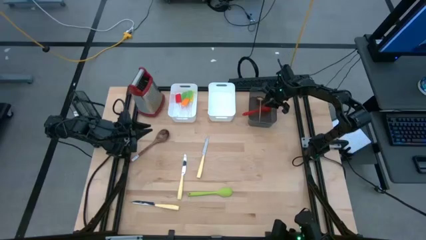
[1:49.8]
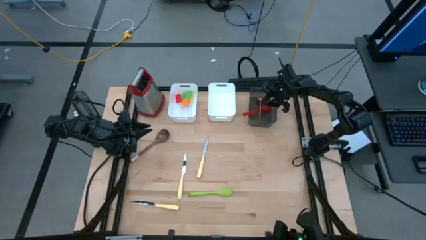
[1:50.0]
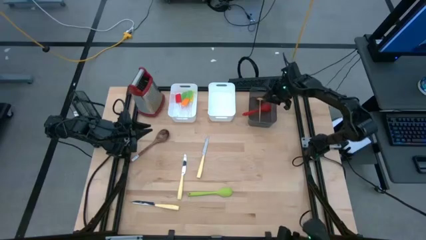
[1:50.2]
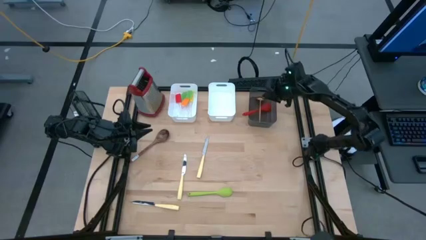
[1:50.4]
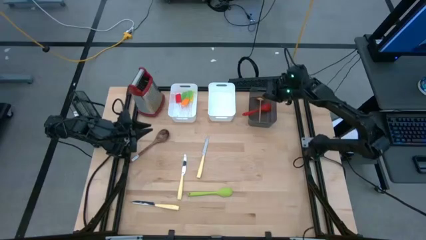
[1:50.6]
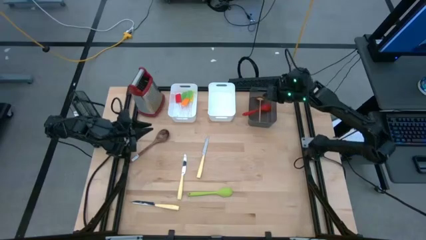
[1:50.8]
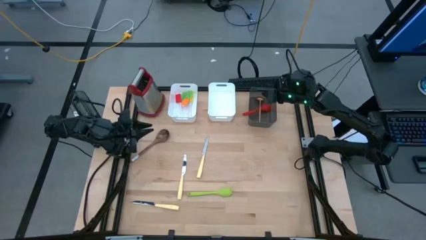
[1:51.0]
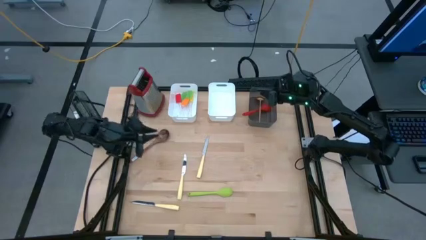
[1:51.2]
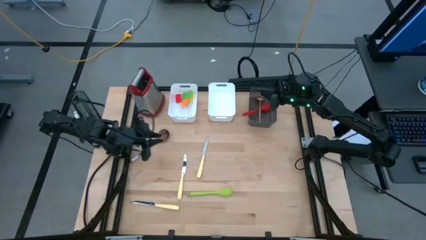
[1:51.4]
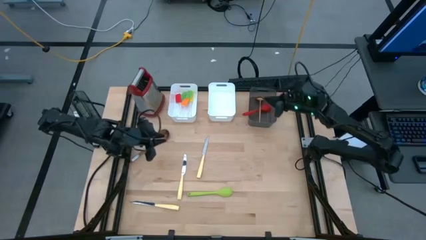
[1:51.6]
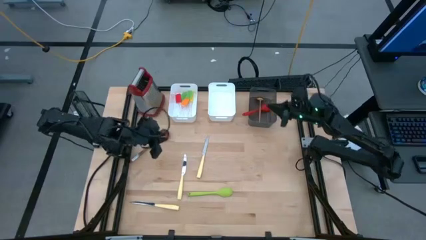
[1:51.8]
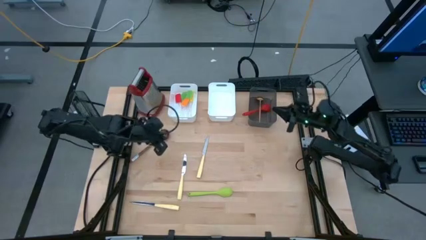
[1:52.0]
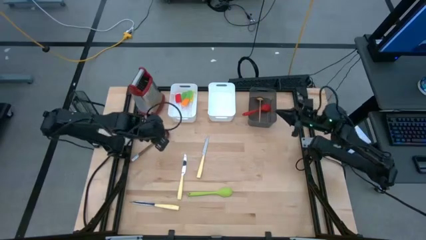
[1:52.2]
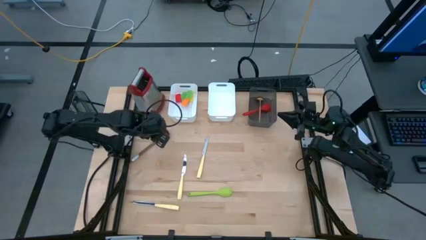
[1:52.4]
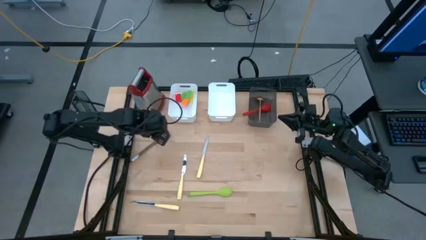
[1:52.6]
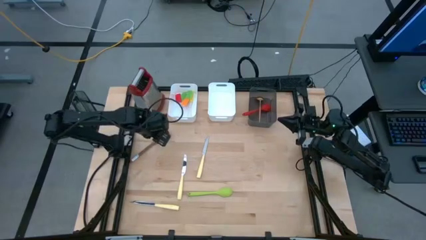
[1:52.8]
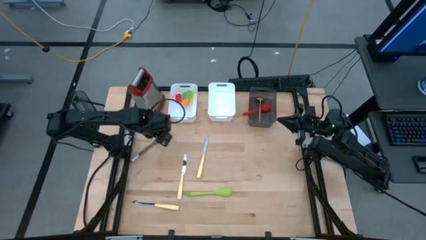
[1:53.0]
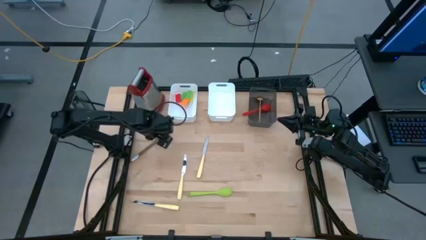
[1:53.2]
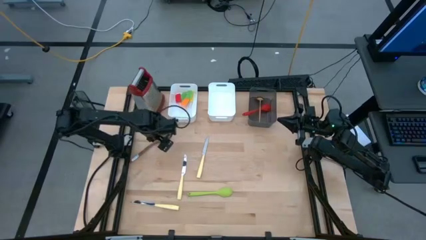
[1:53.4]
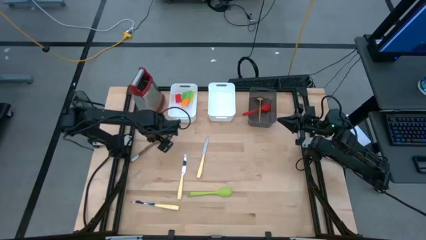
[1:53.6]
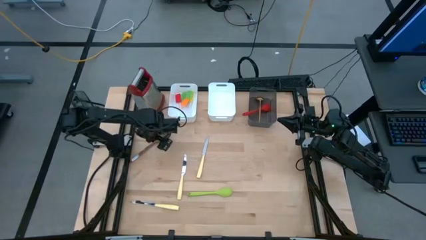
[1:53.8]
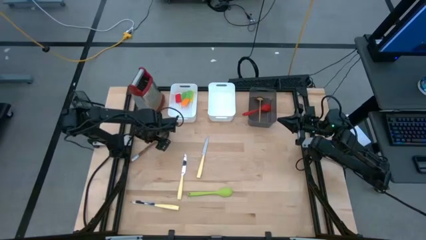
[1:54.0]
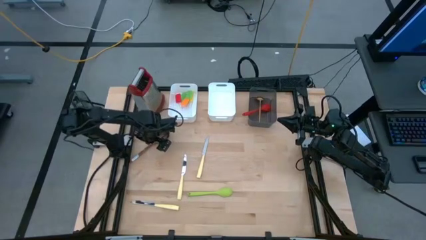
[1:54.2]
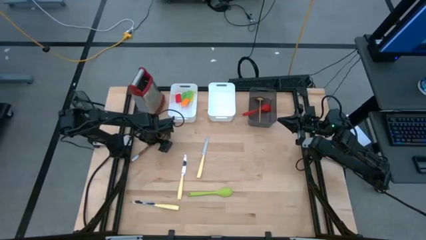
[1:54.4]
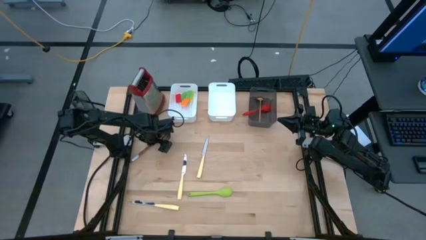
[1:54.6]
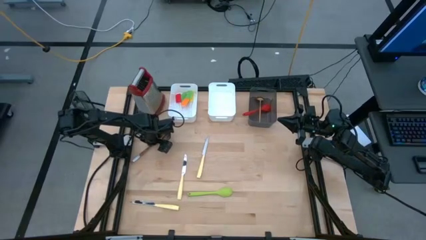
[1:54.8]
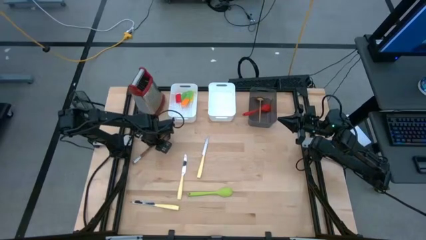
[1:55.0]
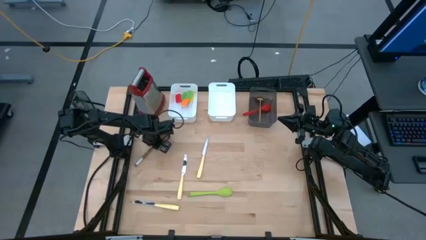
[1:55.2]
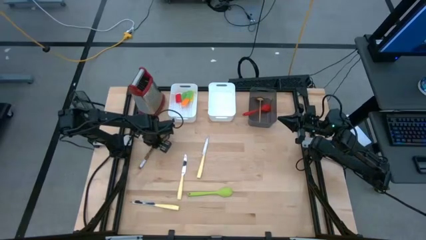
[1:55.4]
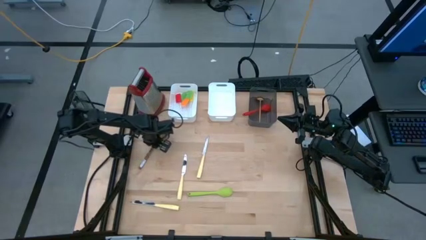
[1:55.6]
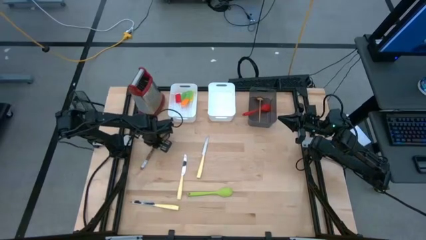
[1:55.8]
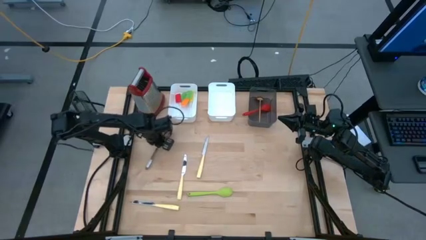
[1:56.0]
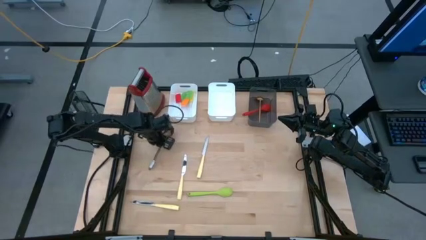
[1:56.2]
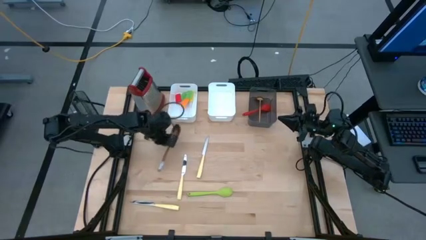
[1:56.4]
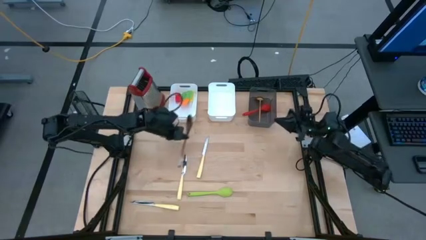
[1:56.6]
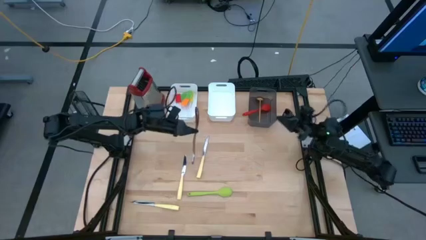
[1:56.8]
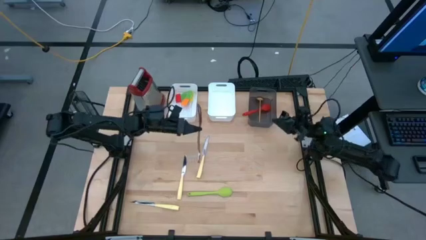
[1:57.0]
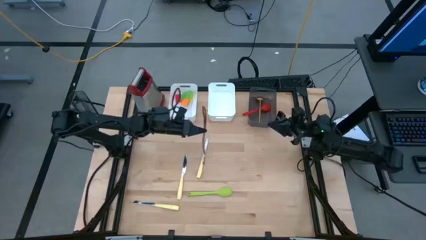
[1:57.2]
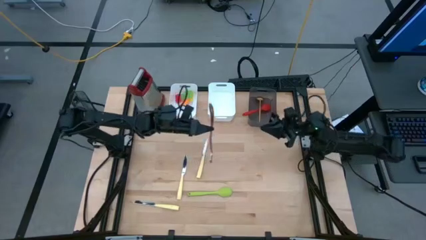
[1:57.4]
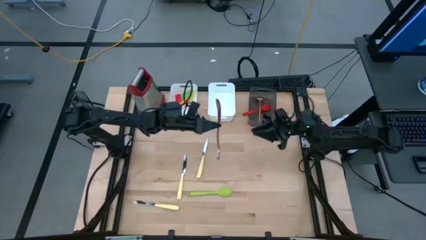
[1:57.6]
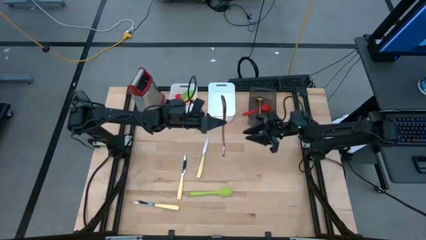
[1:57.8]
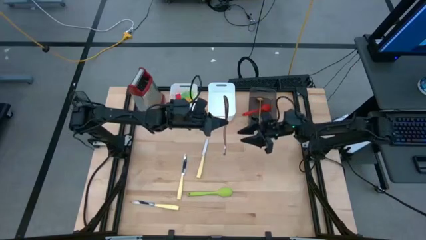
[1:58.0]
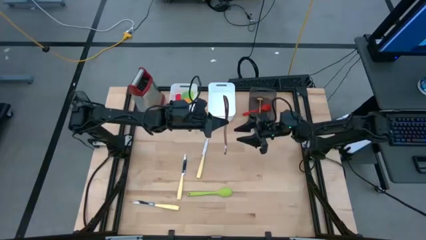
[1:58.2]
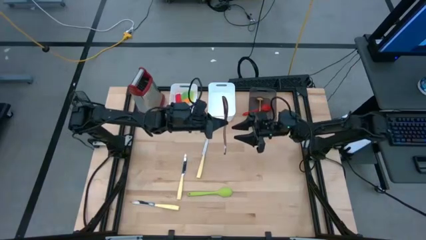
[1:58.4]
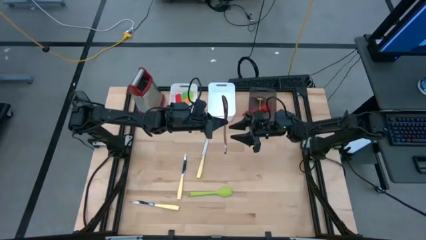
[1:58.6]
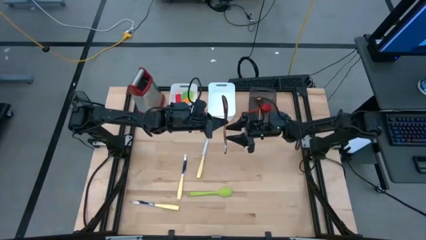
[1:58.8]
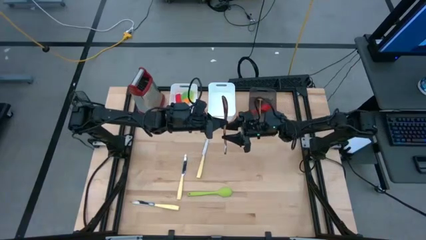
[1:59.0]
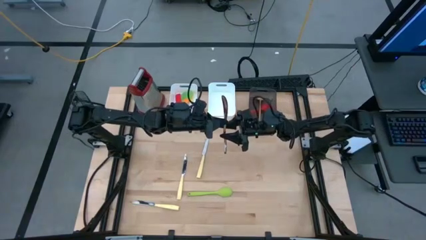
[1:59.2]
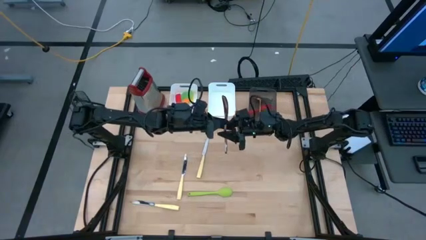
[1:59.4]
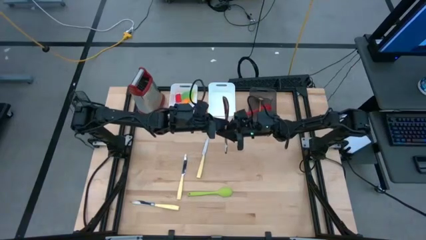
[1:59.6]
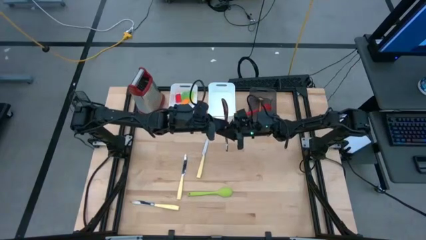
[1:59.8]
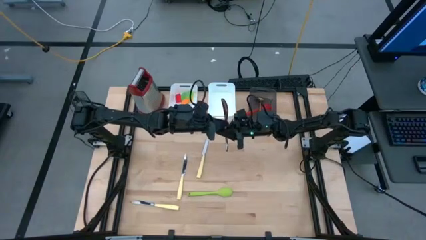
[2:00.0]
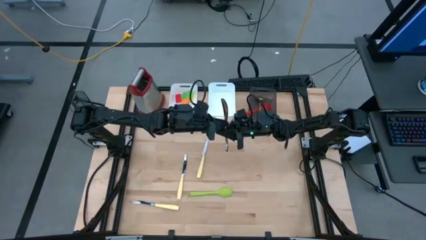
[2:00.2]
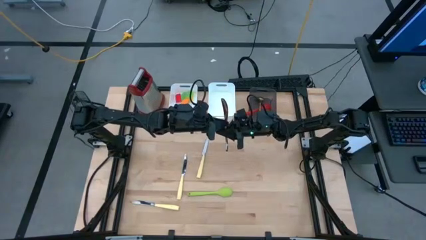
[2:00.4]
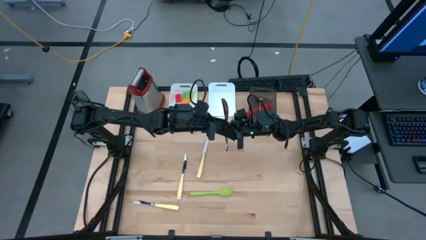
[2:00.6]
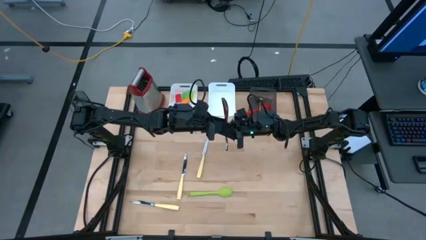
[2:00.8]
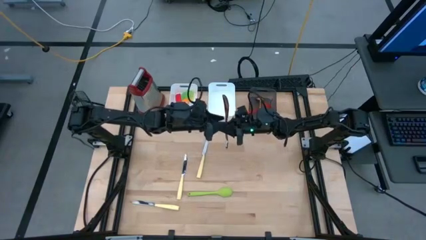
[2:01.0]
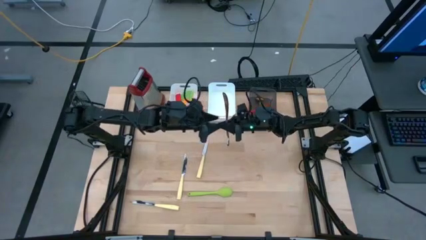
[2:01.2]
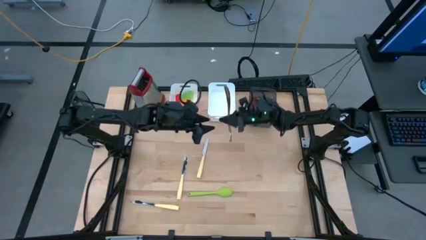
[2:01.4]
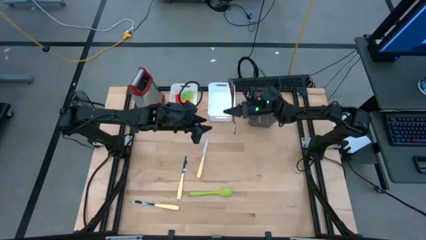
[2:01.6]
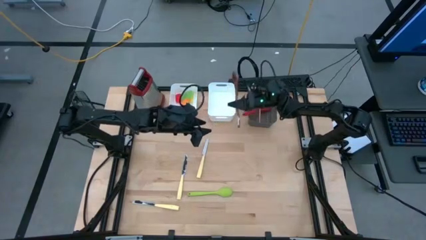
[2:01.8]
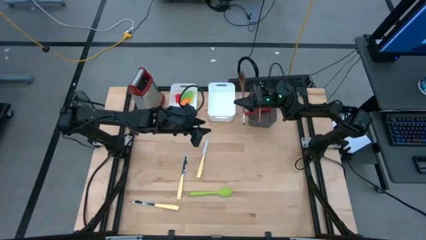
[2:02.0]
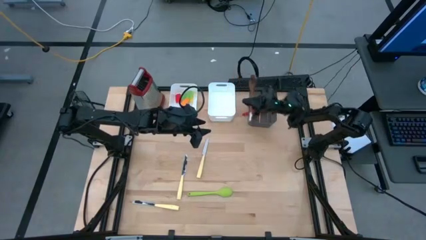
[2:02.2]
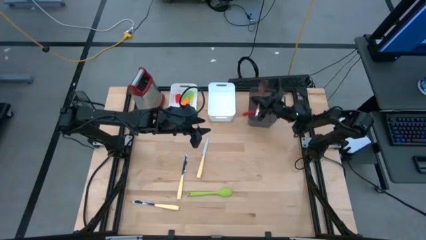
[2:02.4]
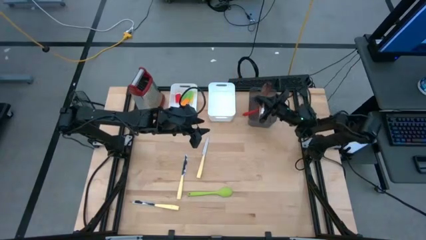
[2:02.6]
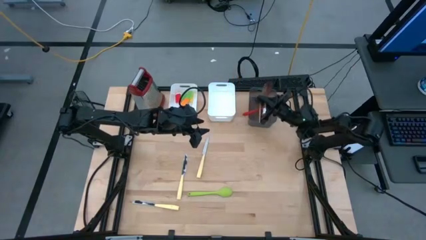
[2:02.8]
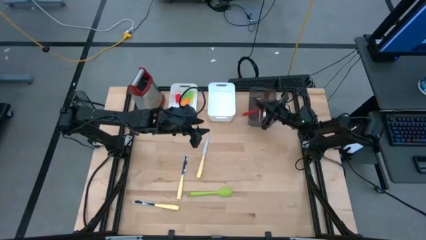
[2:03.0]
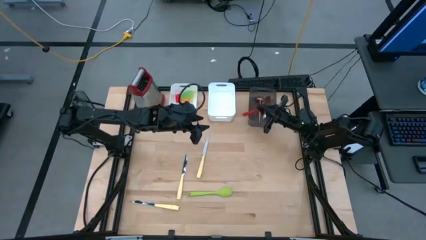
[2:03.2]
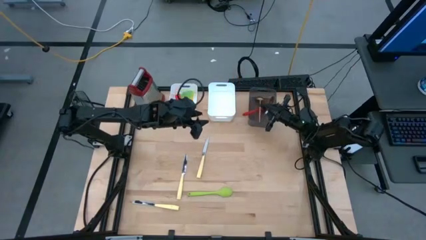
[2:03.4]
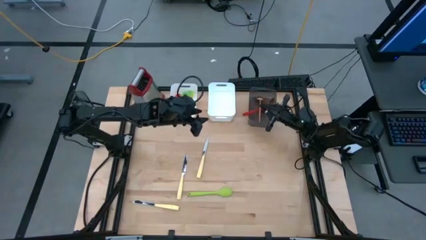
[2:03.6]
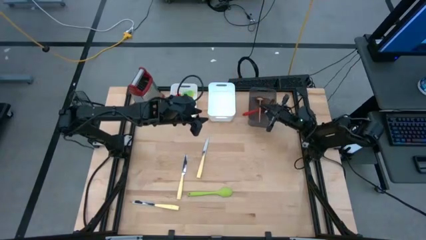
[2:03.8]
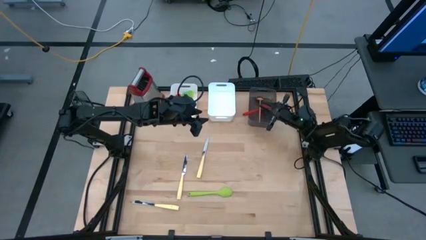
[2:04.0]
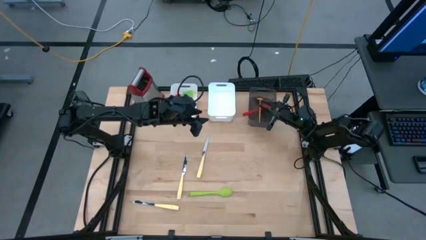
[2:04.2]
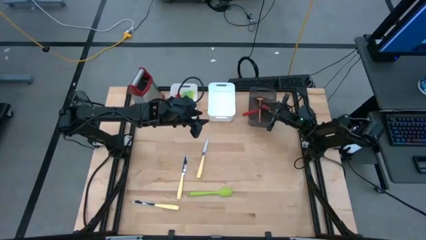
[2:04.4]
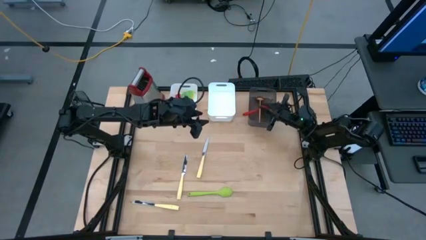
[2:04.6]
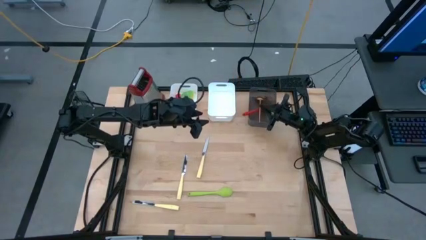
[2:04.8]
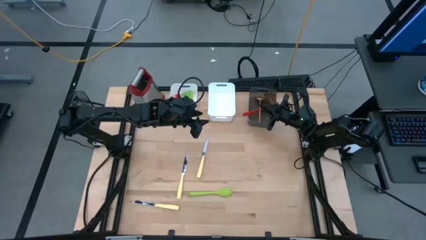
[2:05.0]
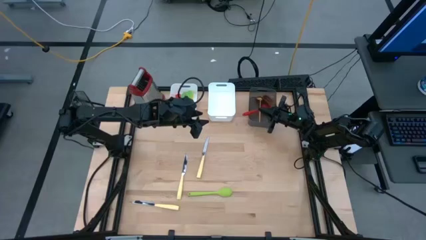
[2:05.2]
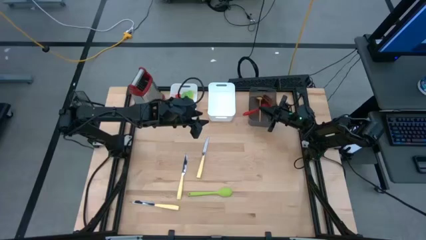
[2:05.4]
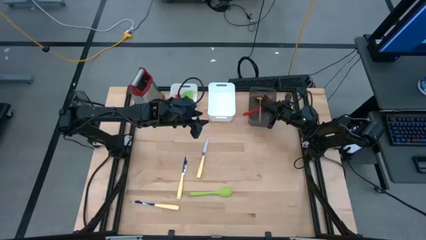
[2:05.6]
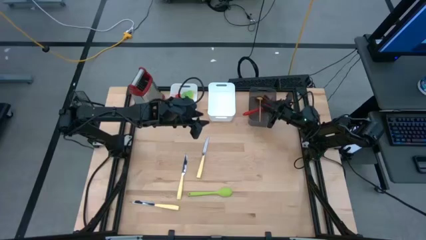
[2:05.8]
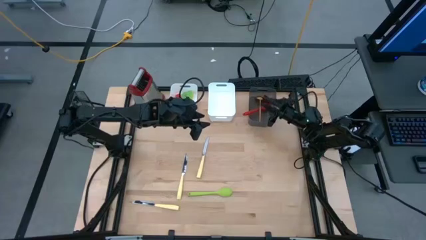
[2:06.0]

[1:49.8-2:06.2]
Task: Pick & Place Kitchen Items
Put the brown serving spoon into the black bin
